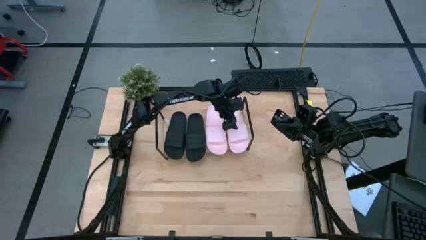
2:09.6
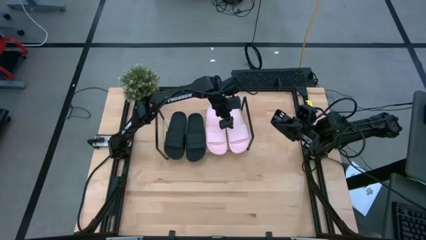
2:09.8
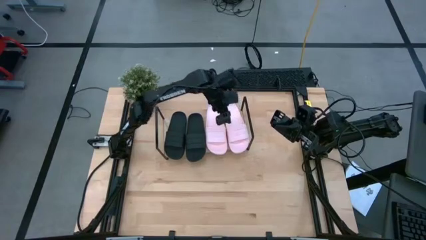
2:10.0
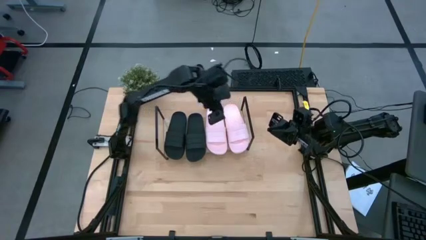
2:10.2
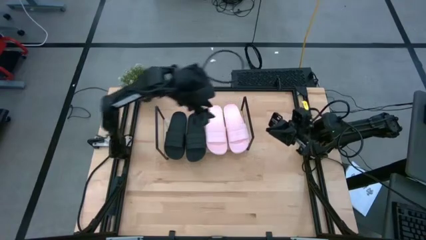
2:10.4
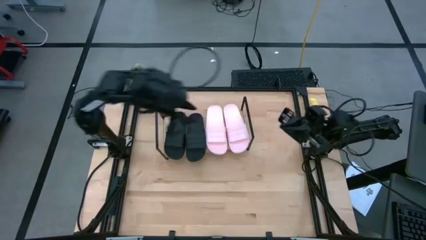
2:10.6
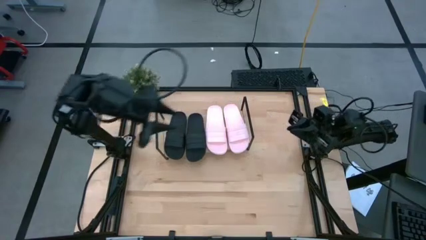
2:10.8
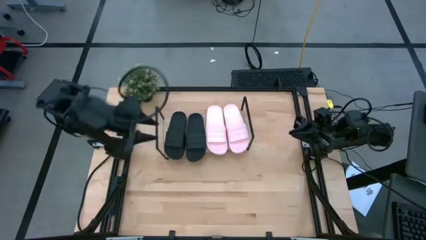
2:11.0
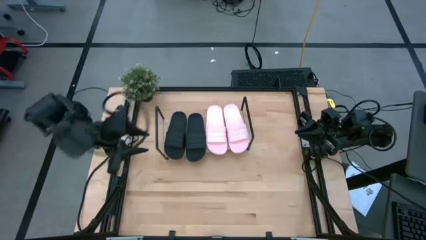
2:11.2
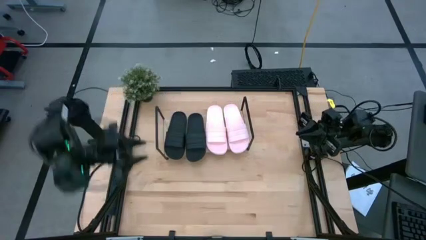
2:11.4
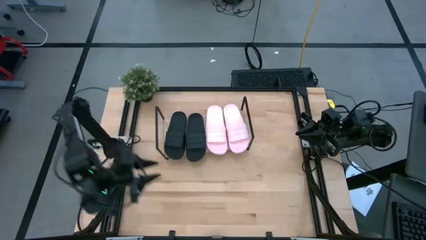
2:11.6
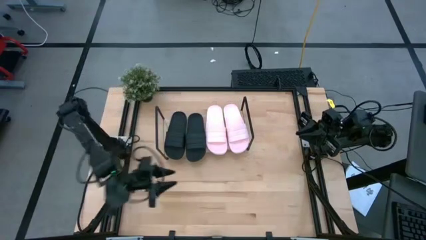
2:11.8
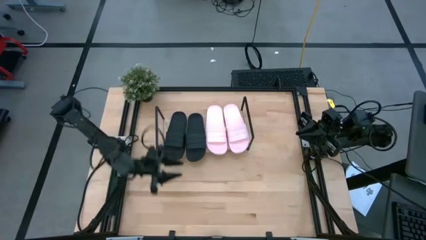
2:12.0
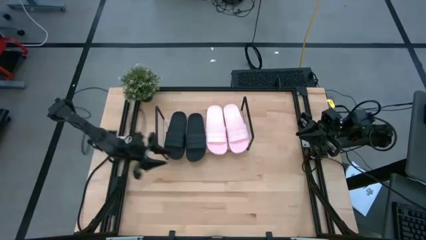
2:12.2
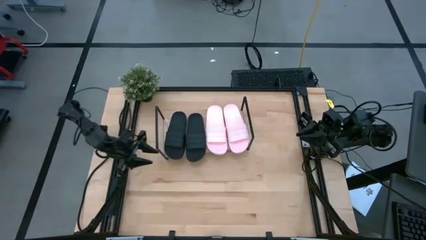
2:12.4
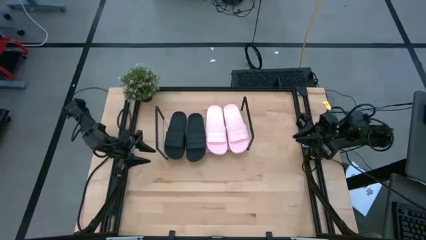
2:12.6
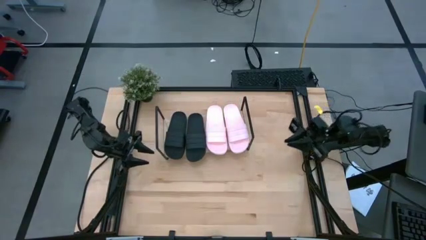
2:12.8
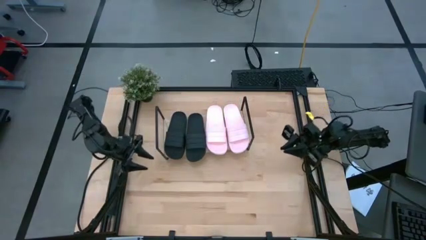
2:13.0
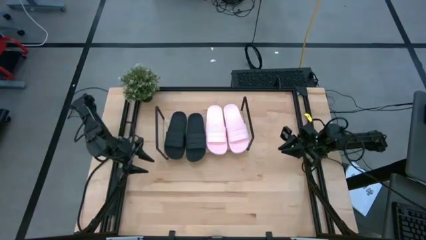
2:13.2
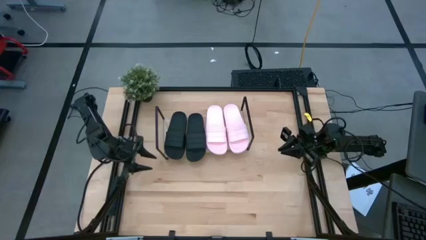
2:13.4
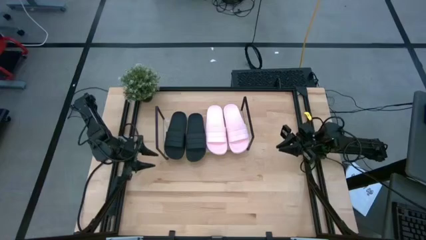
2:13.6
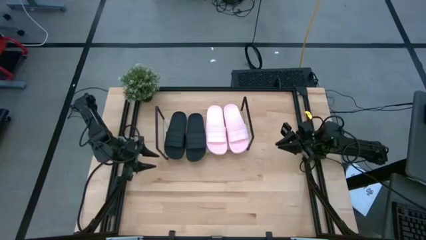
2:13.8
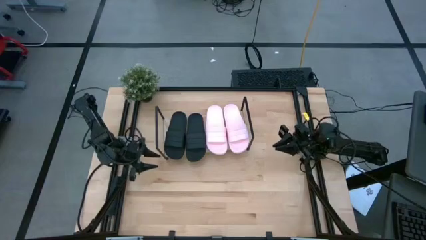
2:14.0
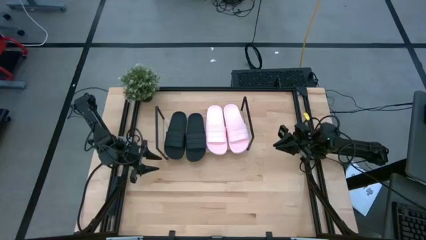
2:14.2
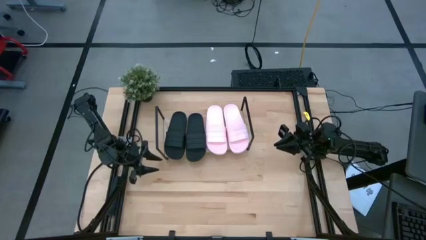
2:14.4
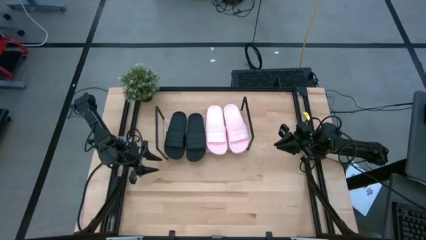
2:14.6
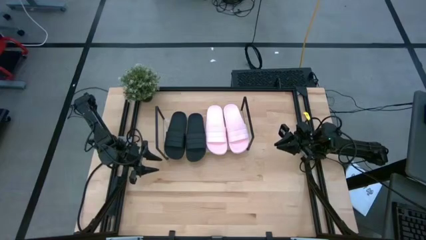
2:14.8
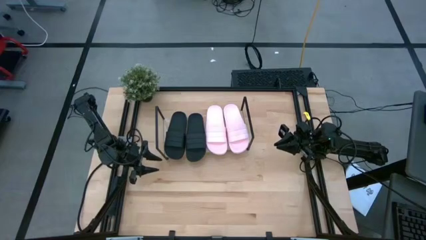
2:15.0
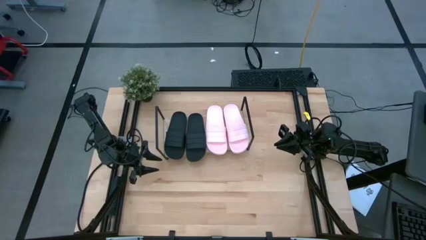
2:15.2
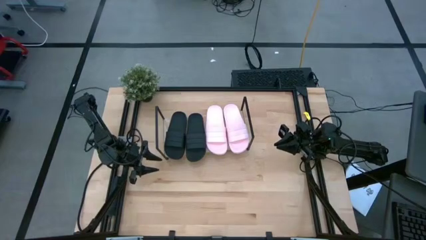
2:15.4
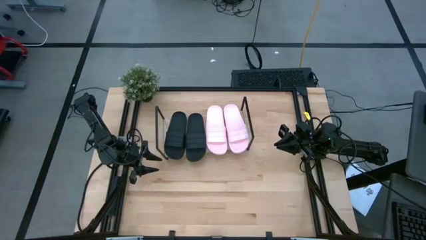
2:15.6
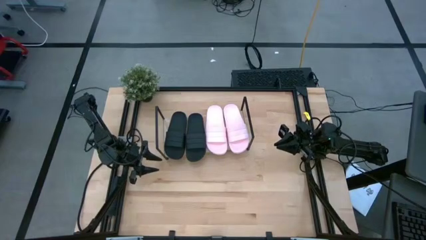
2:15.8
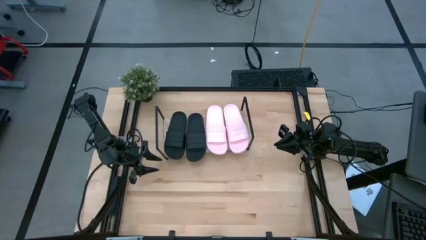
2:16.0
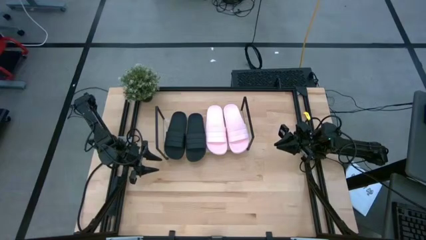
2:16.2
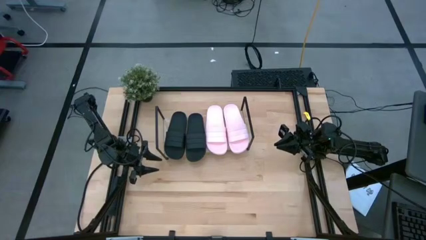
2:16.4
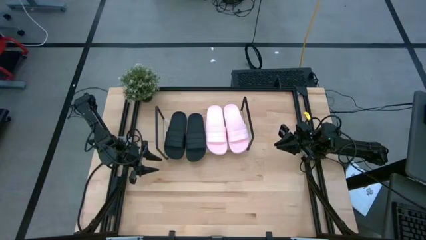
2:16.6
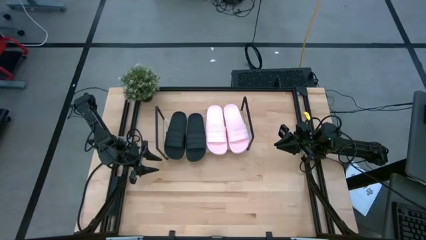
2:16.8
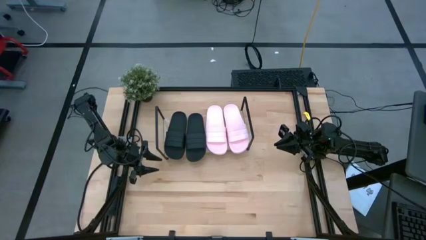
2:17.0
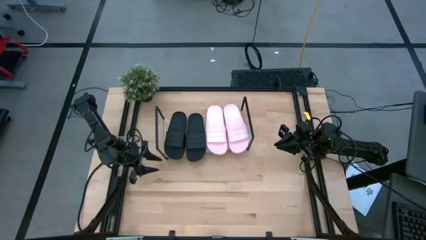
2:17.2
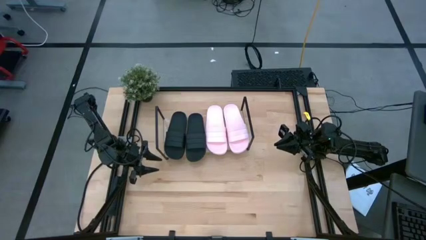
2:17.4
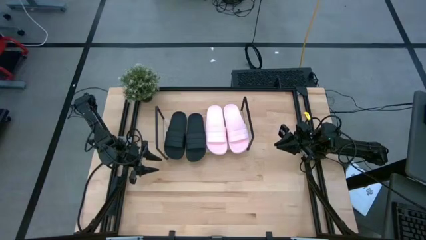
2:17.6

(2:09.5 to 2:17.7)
Task: Pick and place slides into the shelf
Return to Home Position
